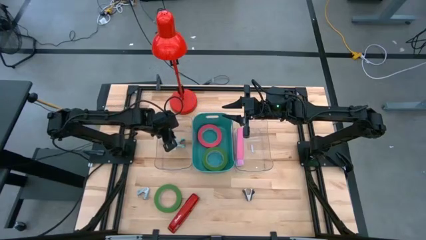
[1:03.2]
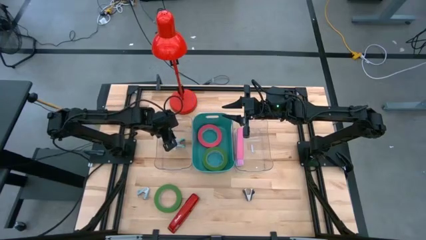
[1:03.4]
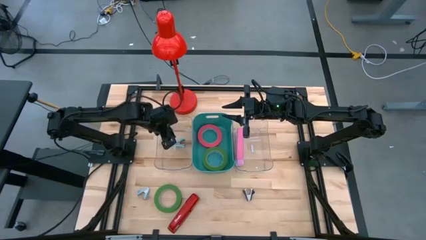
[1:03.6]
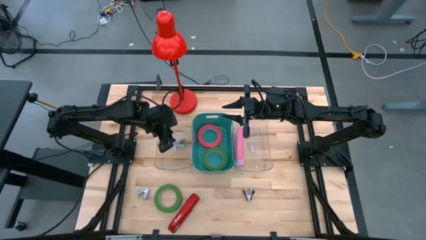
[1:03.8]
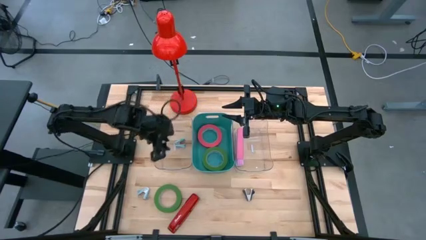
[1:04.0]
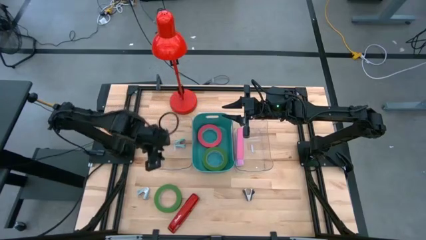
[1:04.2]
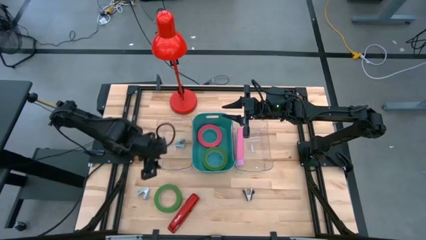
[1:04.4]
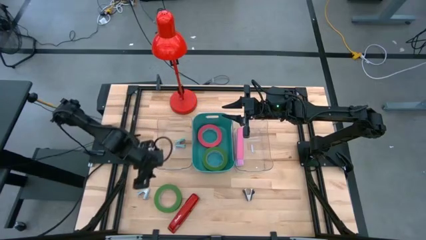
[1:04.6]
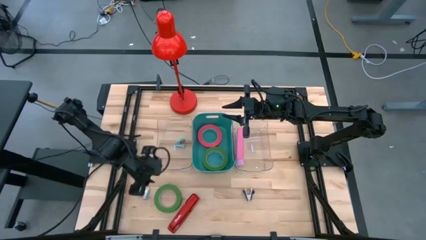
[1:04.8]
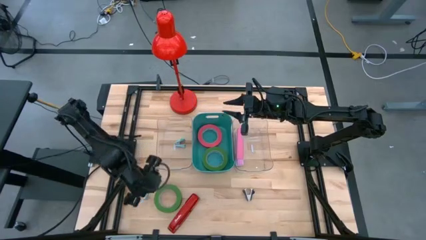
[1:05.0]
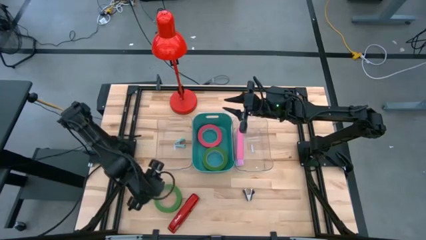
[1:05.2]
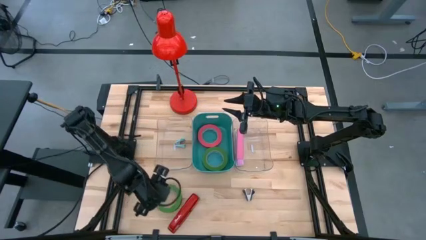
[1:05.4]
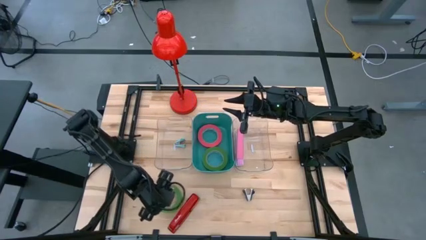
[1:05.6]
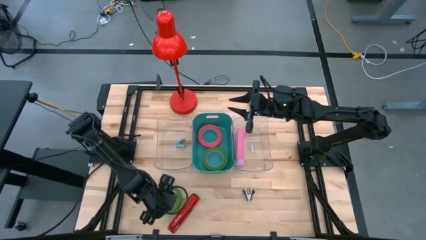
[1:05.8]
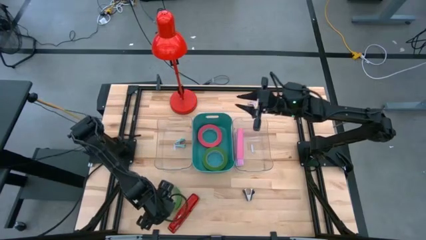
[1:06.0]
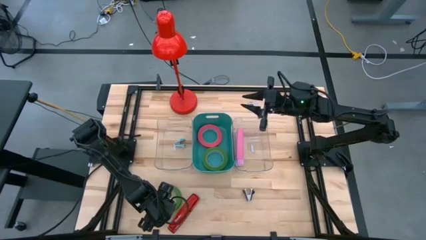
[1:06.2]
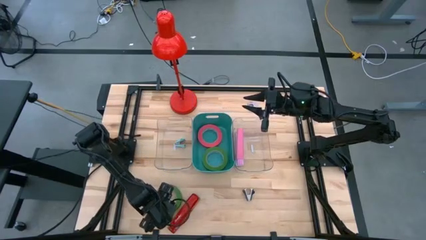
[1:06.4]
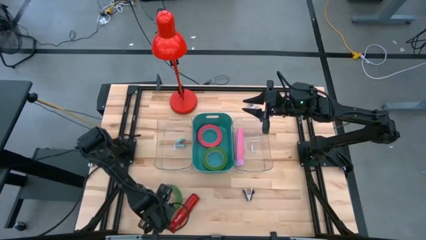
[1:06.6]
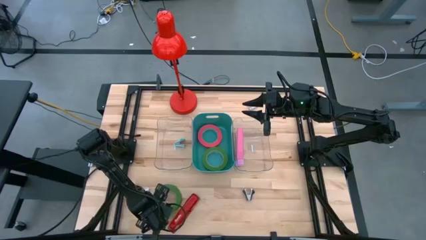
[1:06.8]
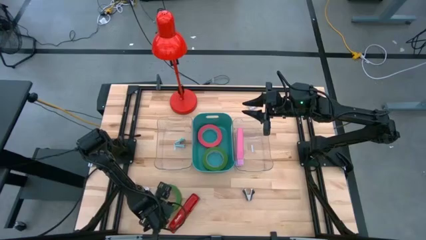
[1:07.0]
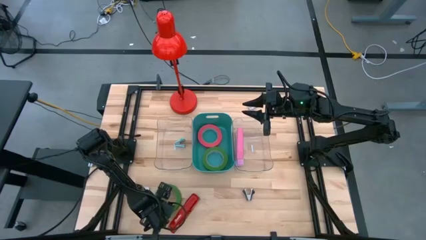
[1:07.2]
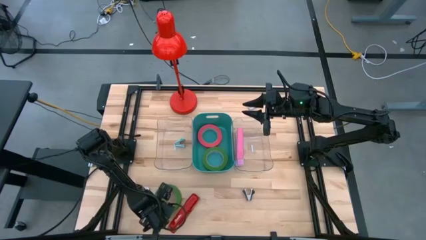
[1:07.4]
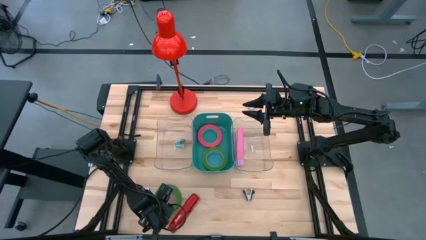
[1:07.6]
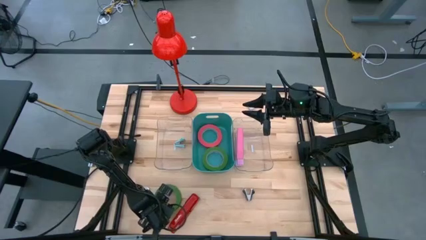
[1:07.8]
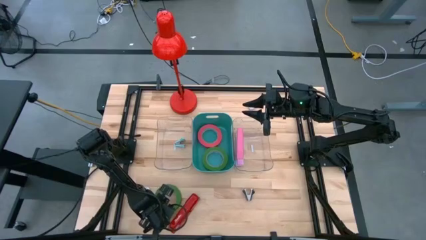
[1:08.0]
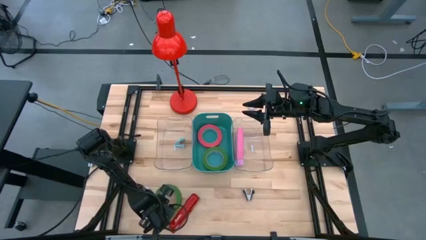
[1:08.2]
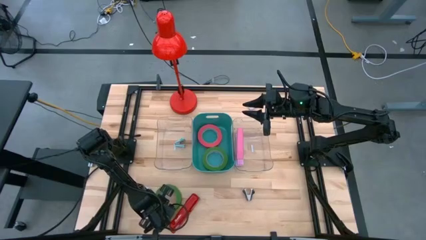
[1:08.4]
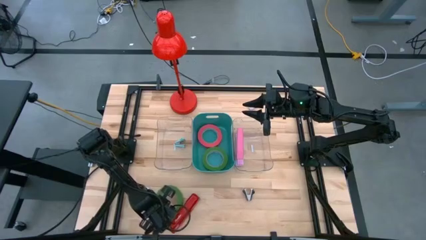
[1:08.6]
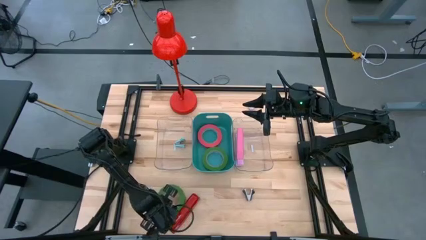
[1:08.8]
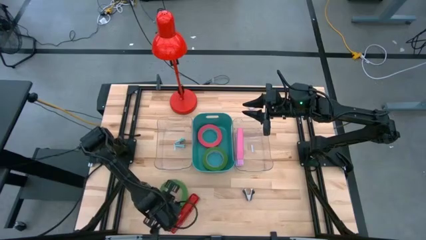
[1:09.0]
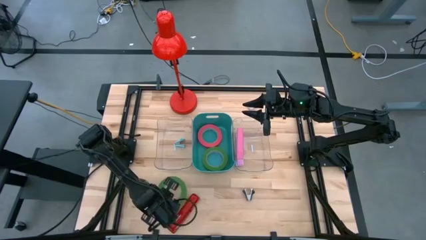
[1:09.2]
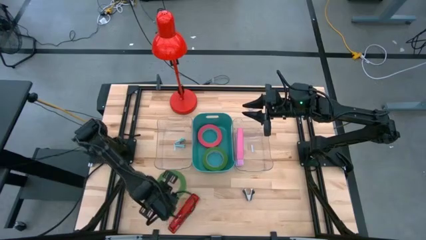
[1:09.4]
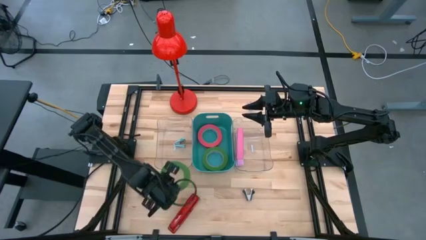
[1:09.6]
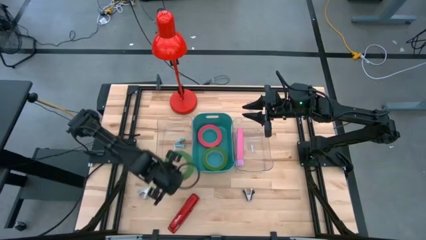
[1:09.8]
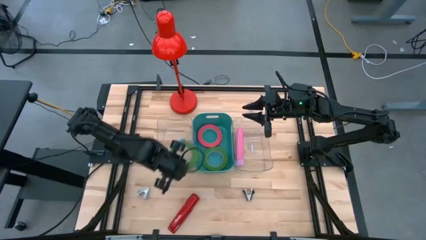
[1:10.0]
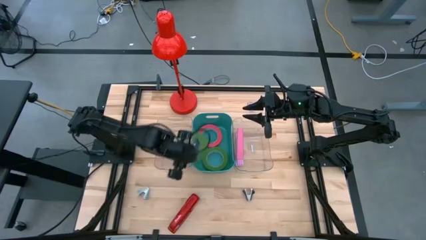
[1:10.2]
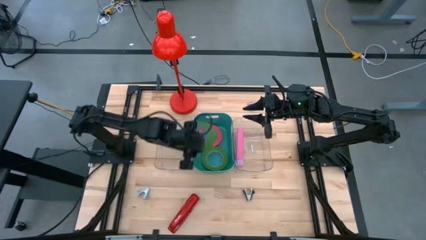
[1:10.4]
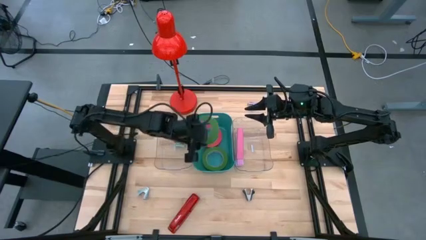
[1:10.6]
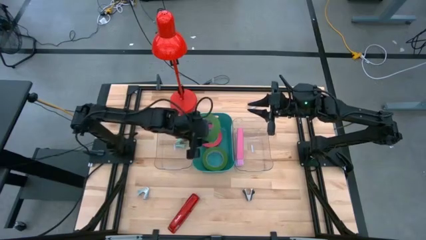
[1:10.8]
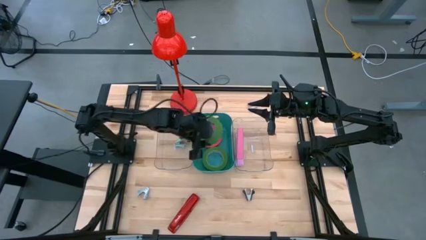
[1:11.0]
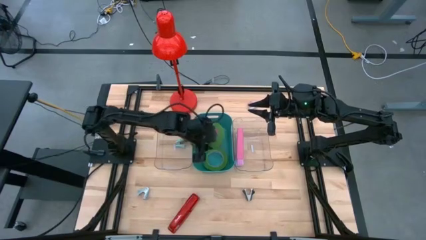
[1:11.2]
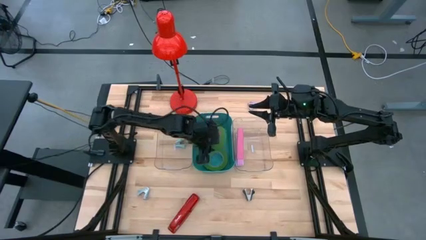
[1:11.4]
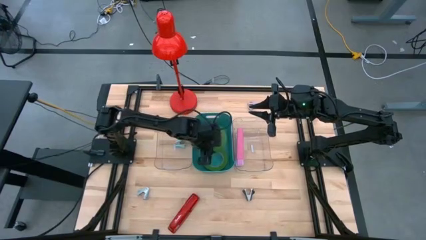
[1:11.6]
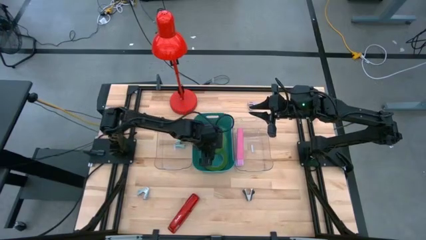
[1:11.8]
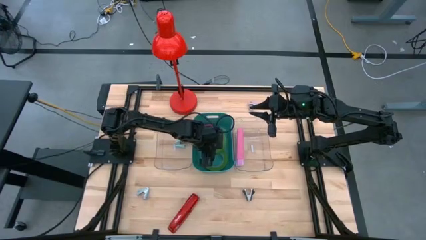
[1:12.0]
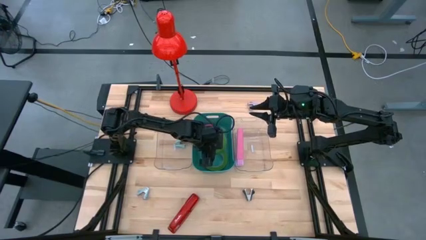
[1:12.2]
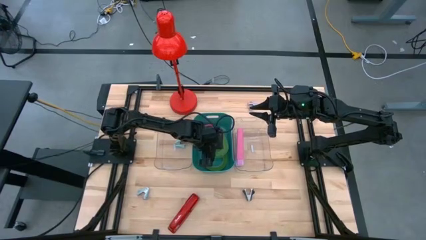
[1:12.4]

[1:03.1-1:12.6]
Task: Pick and place Stapler, Stapler remover, tape
Put the green tape into the green bin

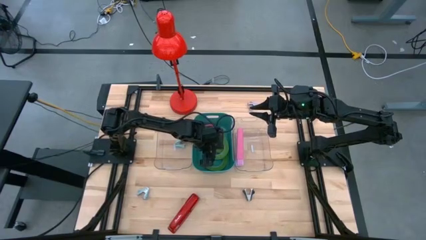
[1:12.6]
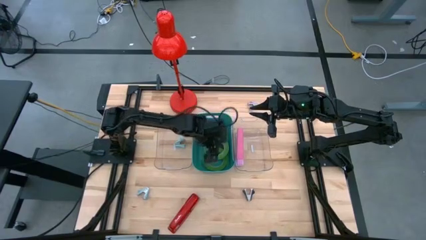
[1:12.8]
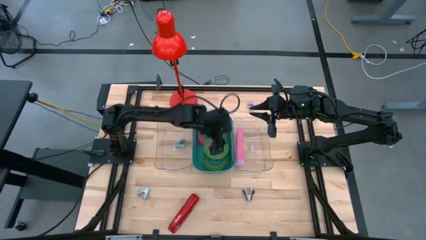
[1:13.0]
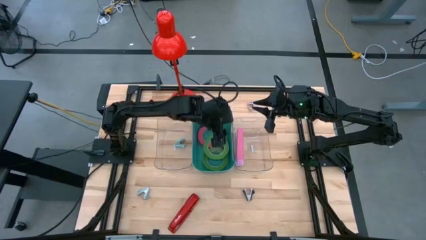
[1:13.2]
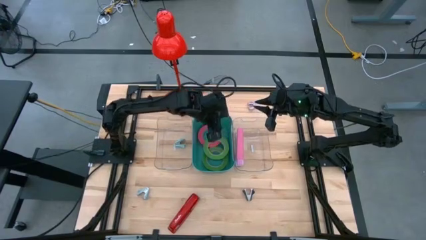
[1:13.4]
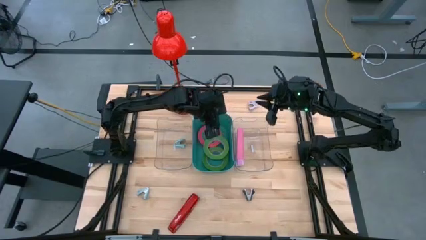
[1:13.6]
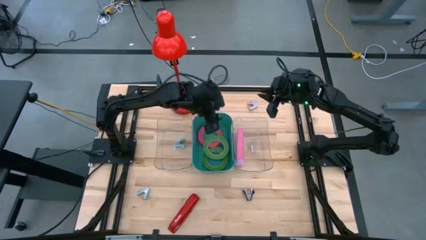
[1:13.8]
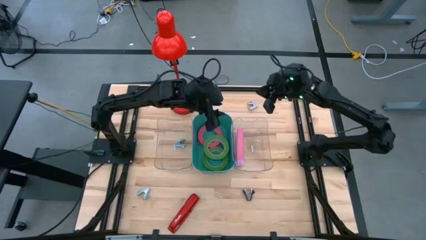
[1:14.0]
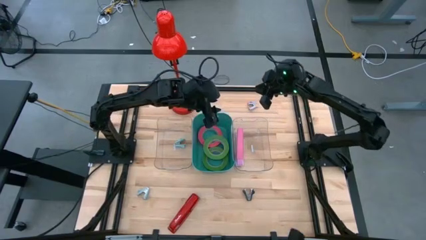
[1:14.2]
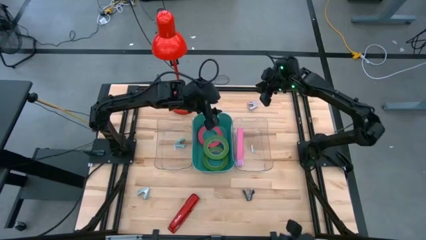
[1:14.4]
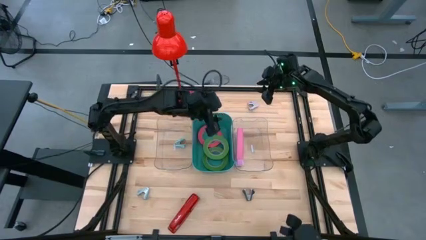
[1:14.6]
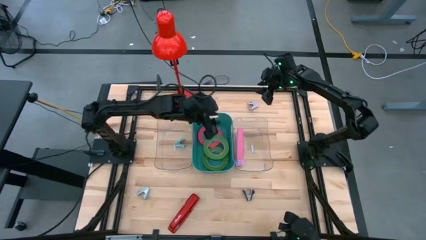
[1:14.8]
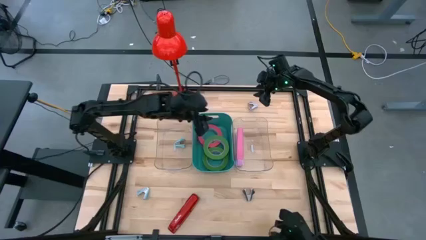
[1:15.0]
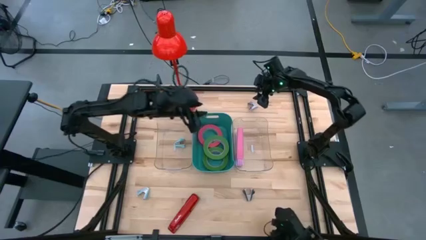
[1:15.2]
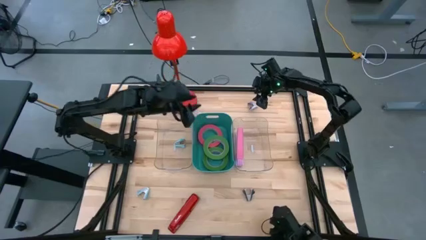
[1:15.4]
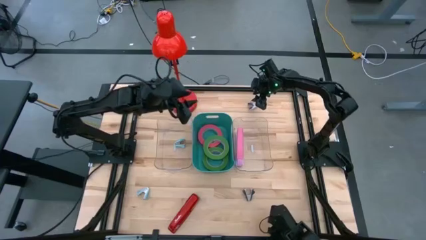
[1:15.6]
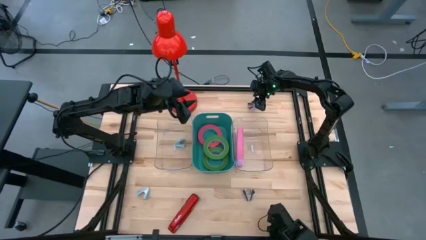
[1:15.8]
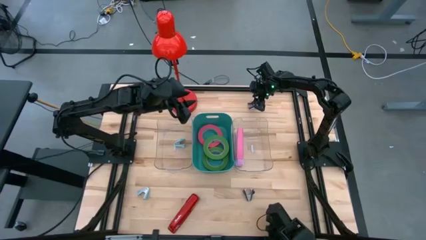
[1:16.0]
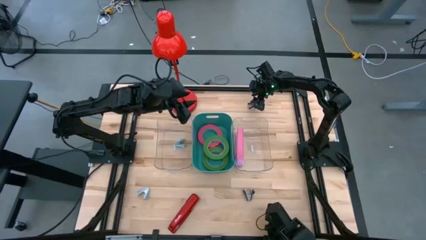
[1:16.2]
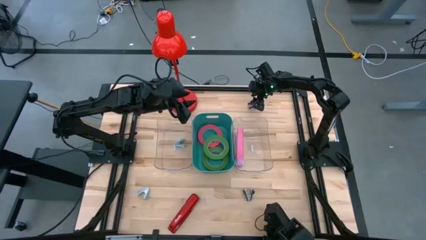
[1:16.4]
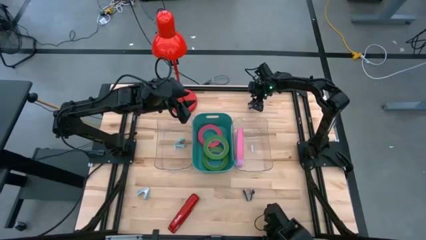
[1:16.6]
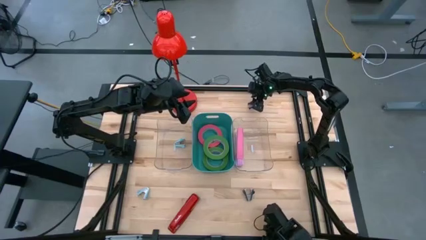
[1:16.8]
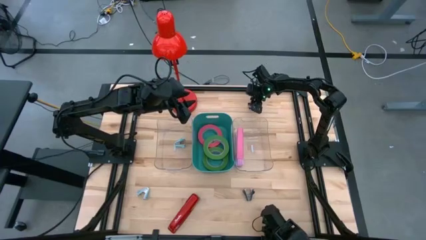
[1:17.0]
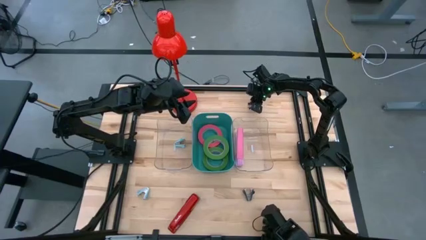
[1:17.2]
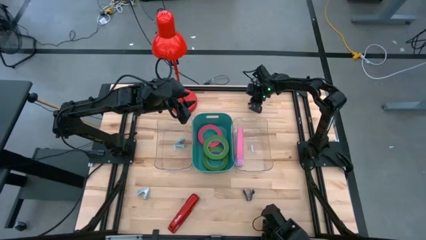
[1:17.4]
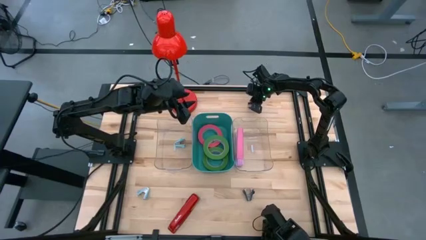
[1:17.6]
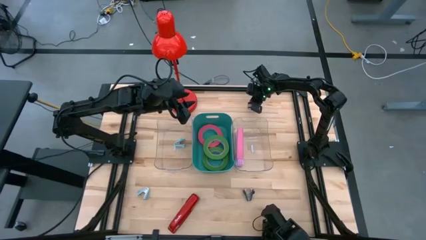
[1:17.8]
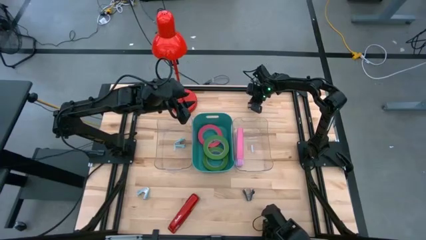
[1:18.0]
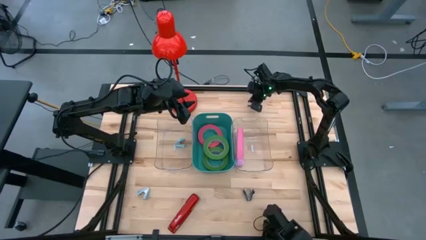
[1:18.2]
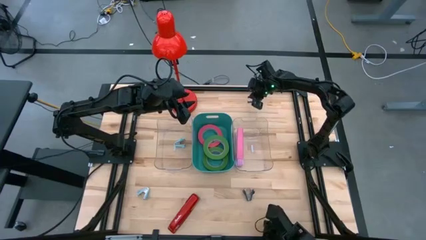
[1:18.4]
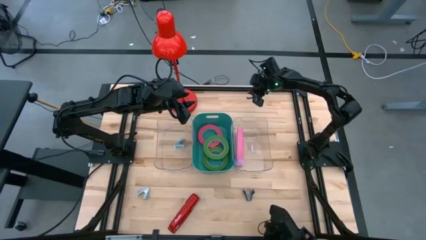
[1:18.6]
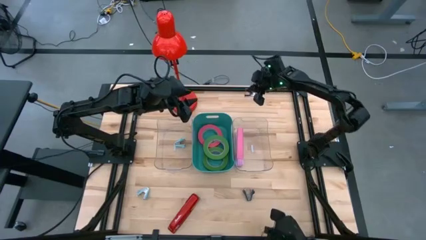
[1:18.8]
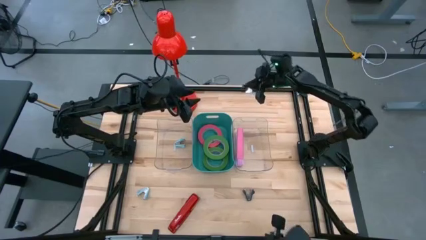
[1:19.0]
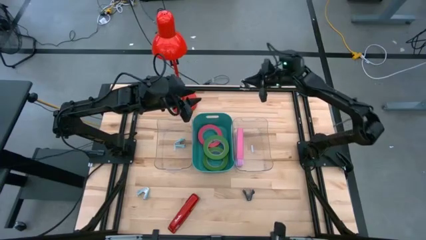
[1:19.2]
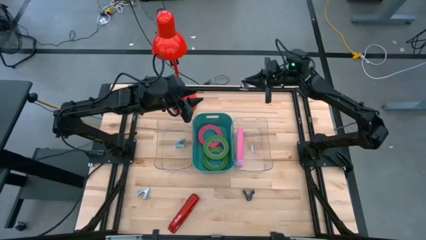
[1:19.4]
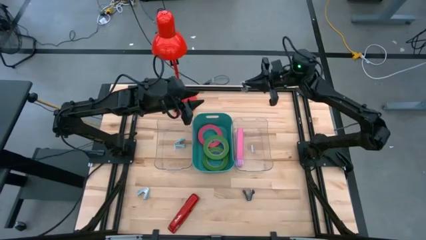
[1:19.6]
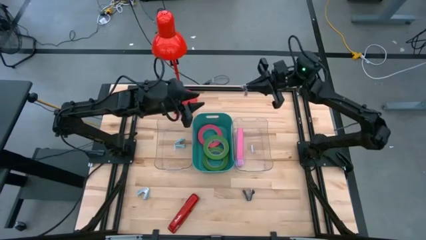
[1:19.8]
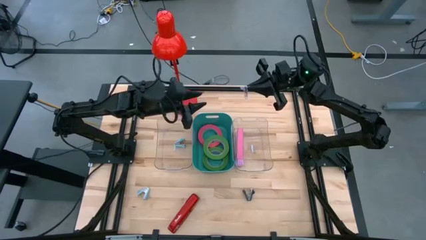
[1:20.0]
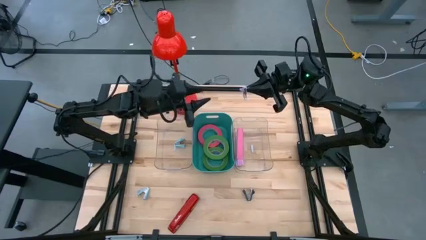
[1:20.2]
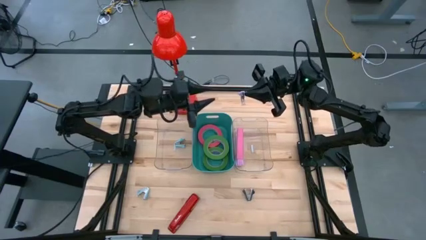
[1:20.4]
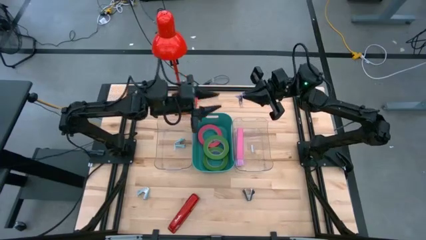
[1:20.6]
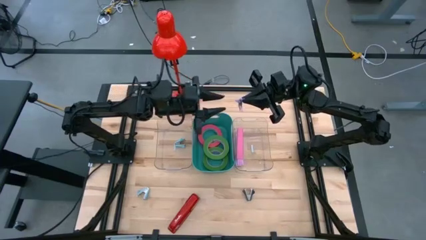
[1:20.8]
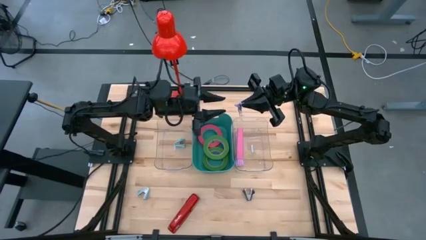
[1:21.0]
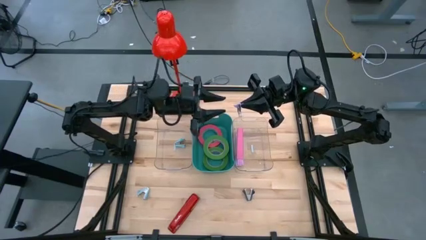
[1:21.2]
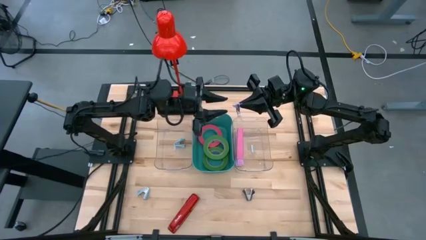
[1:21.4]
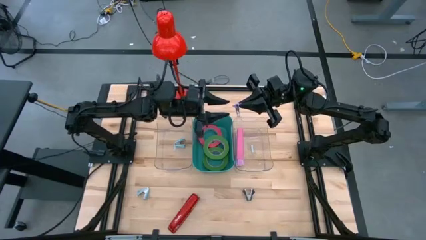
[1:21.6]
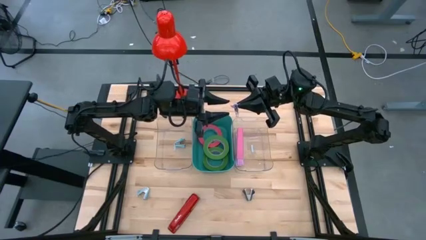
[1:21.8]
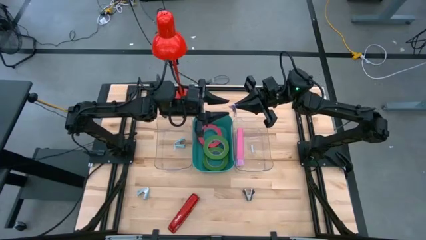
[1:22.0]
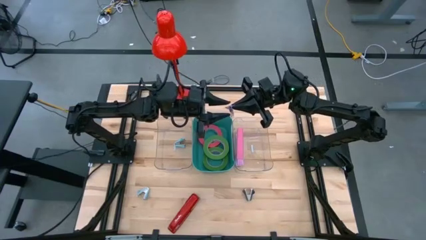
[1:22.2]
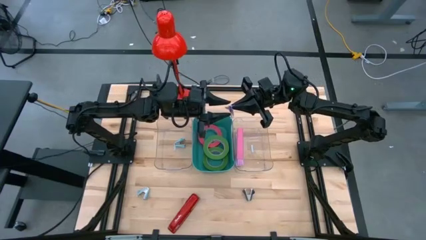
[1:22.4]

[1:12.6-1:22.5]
Put the top light blue stapler remover into the left transparent bin
